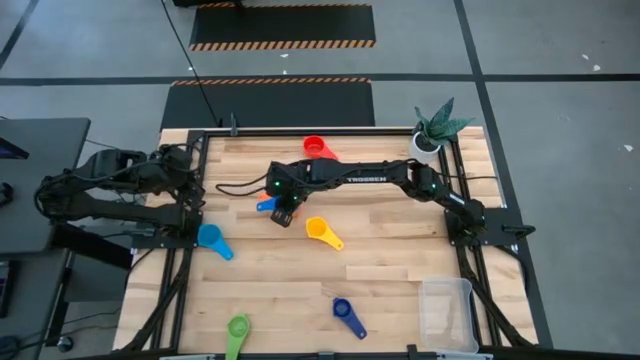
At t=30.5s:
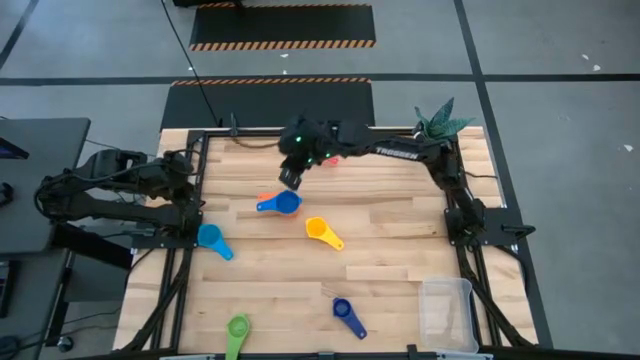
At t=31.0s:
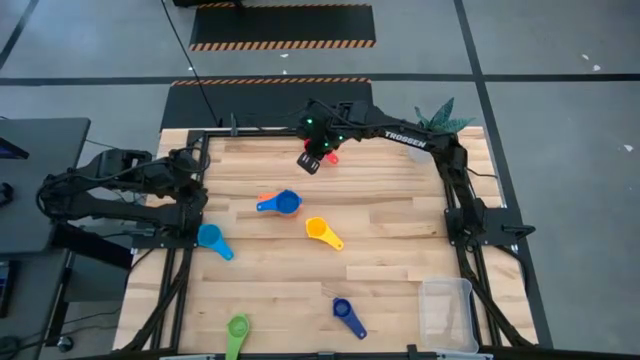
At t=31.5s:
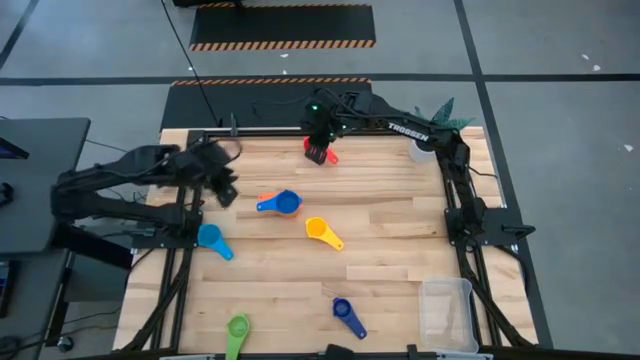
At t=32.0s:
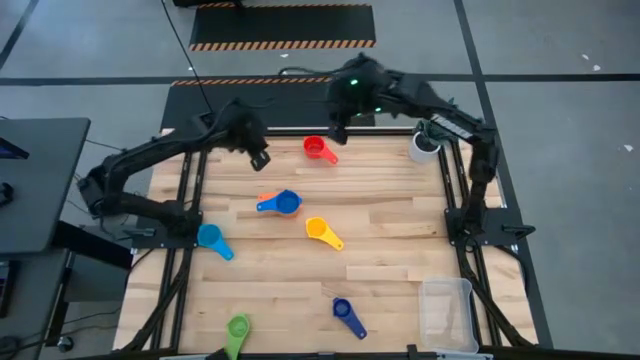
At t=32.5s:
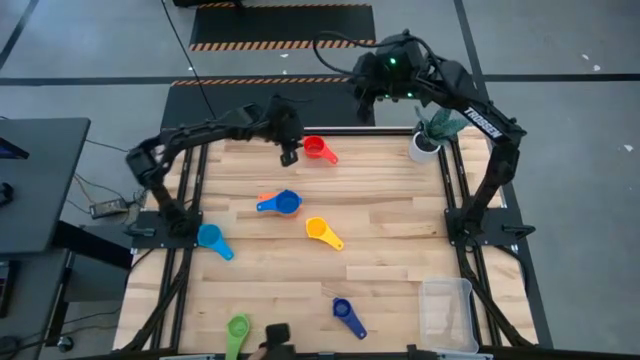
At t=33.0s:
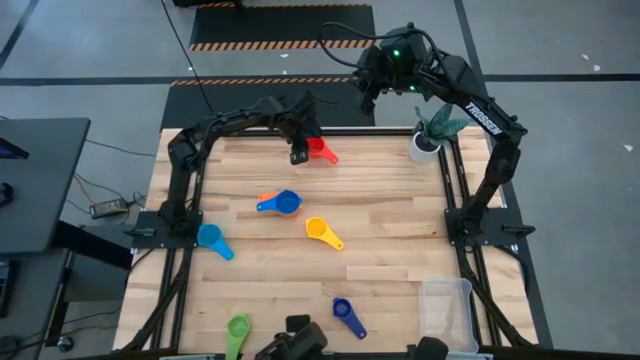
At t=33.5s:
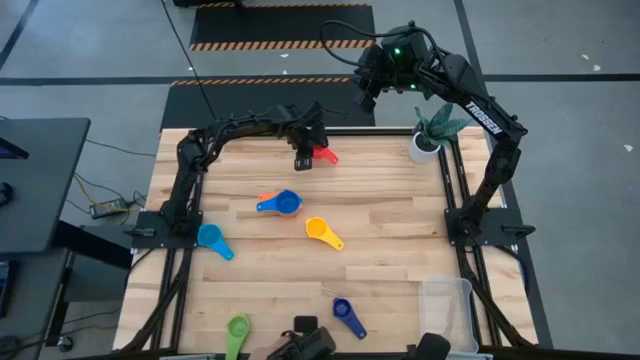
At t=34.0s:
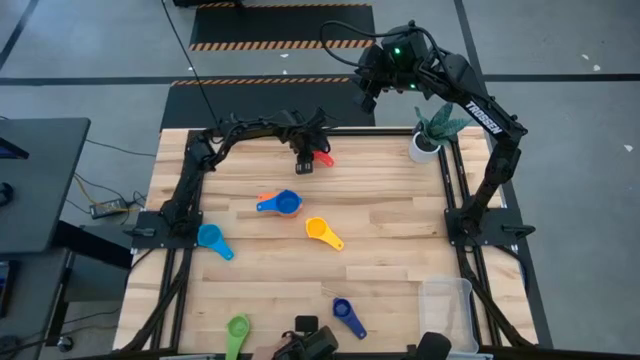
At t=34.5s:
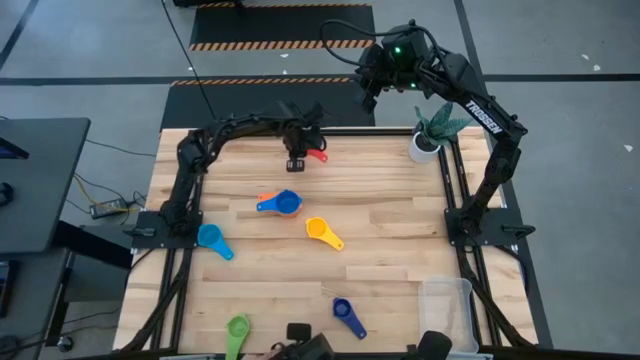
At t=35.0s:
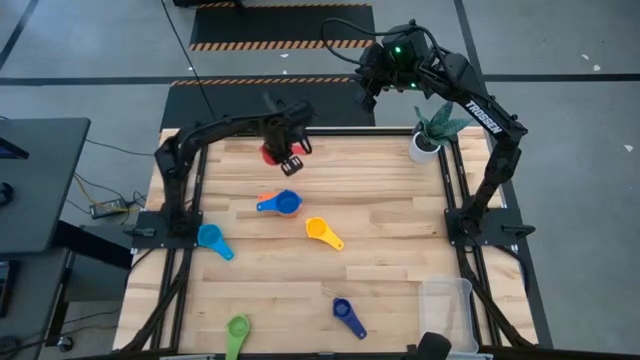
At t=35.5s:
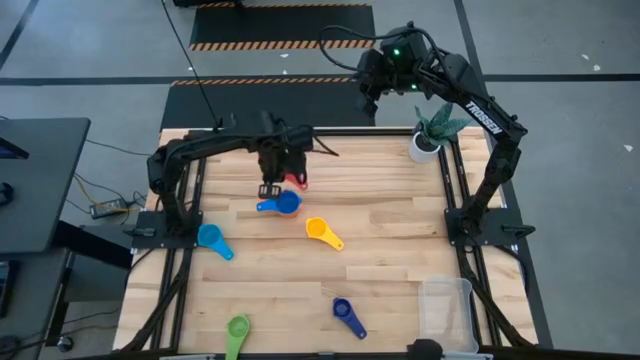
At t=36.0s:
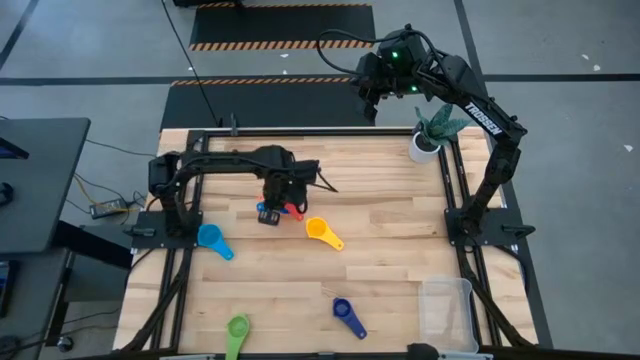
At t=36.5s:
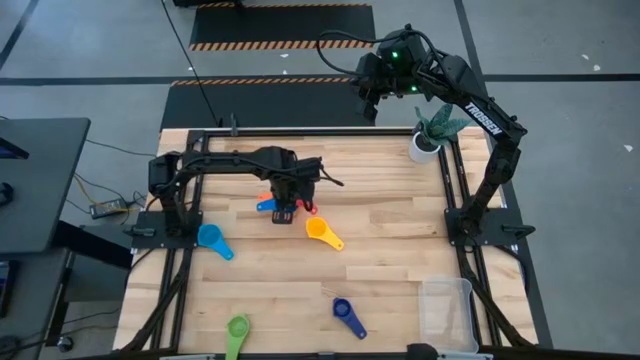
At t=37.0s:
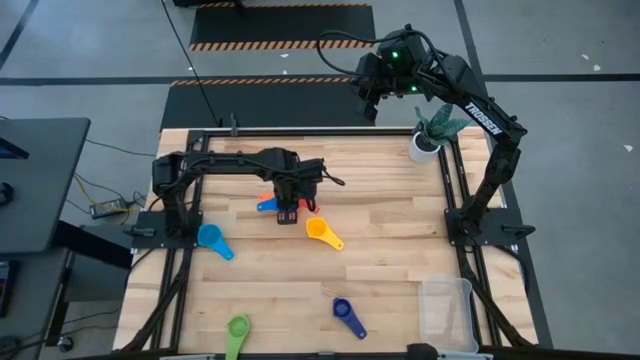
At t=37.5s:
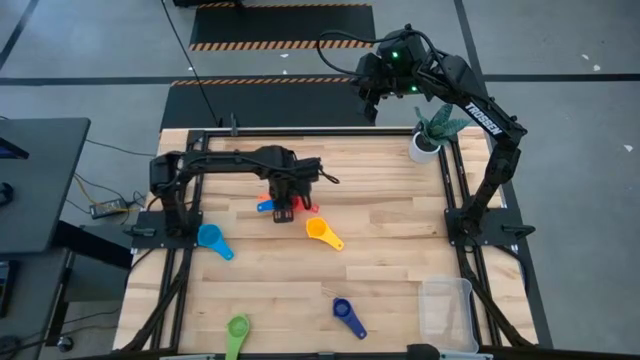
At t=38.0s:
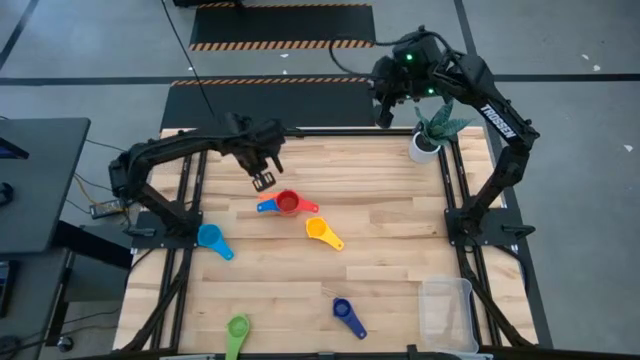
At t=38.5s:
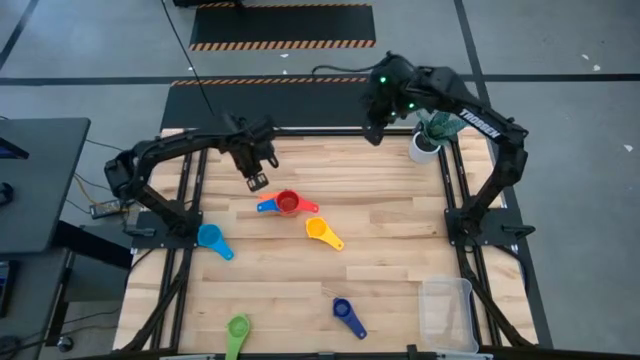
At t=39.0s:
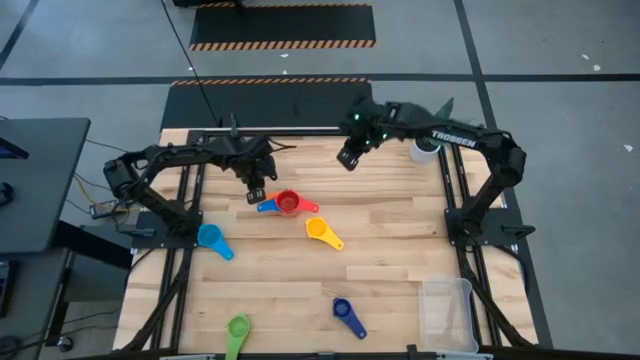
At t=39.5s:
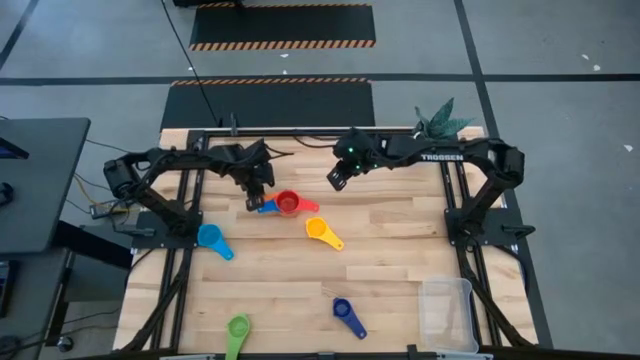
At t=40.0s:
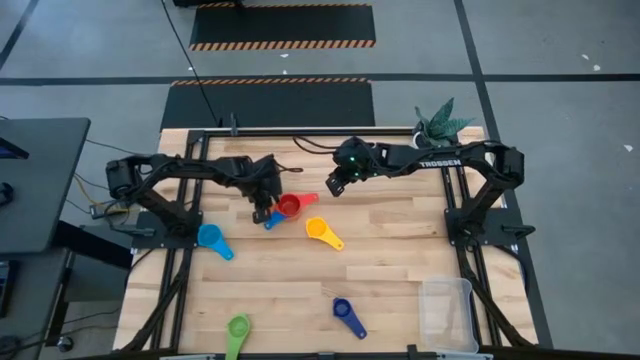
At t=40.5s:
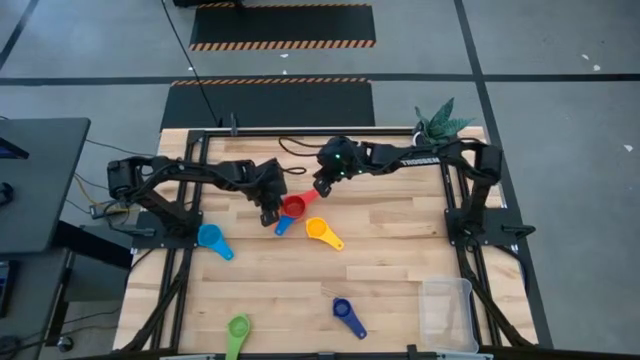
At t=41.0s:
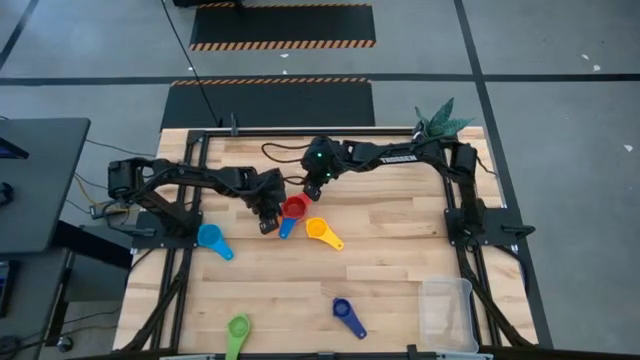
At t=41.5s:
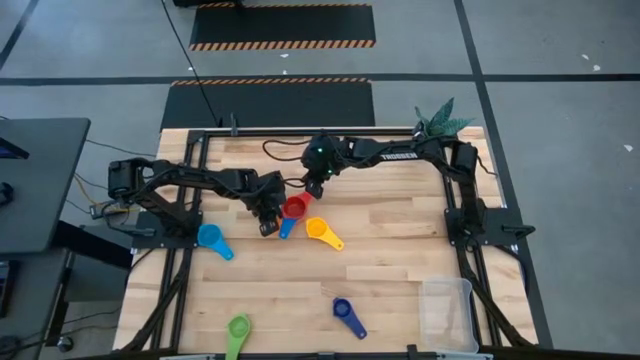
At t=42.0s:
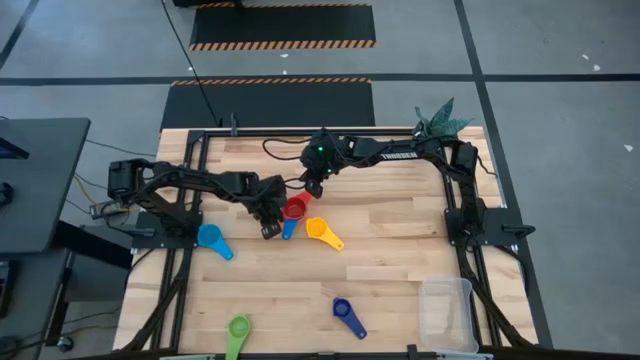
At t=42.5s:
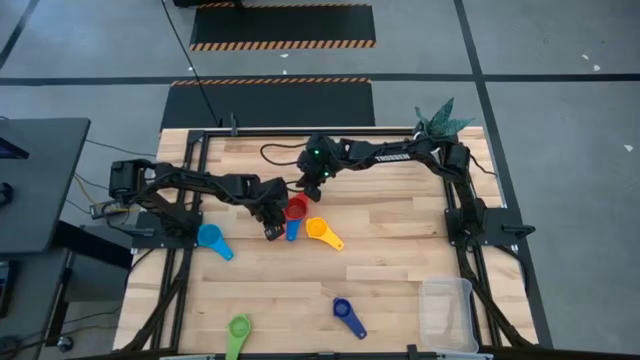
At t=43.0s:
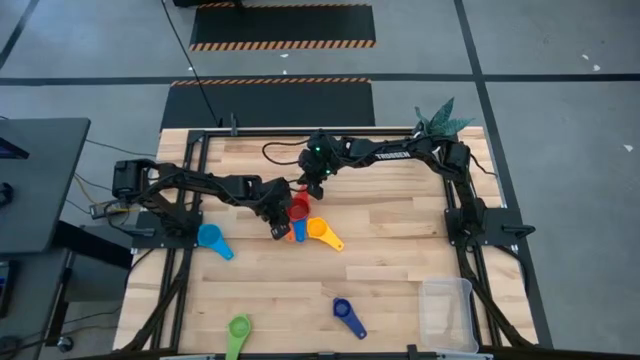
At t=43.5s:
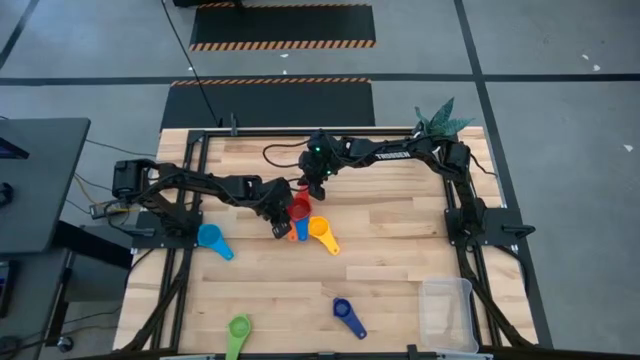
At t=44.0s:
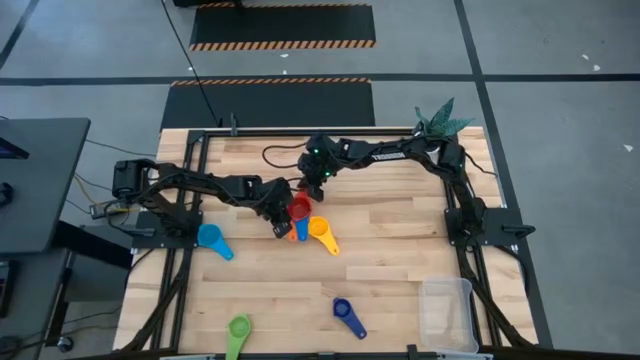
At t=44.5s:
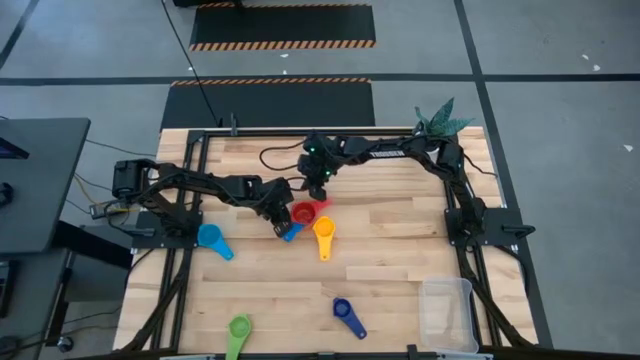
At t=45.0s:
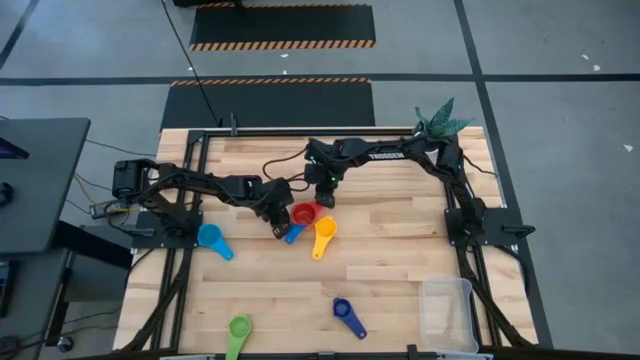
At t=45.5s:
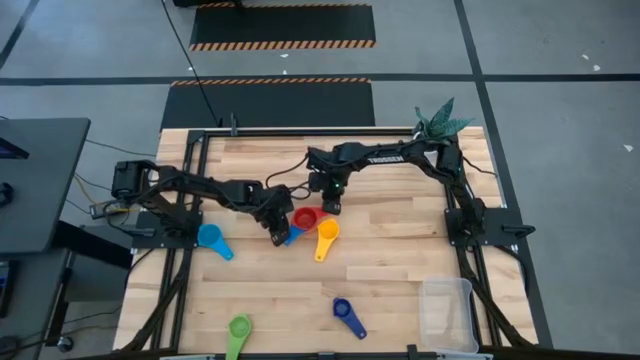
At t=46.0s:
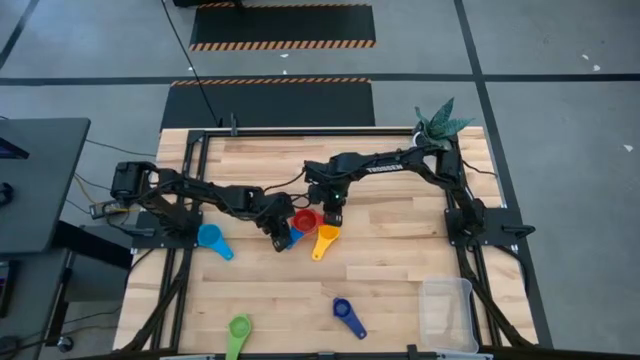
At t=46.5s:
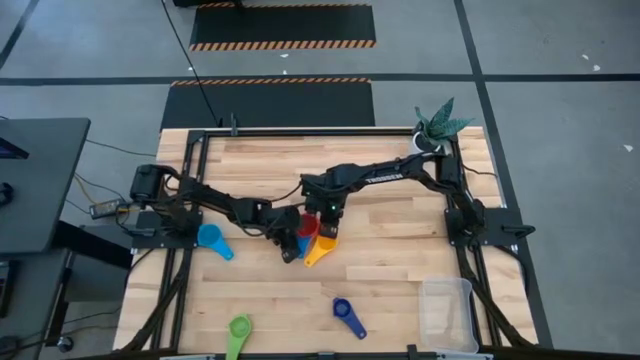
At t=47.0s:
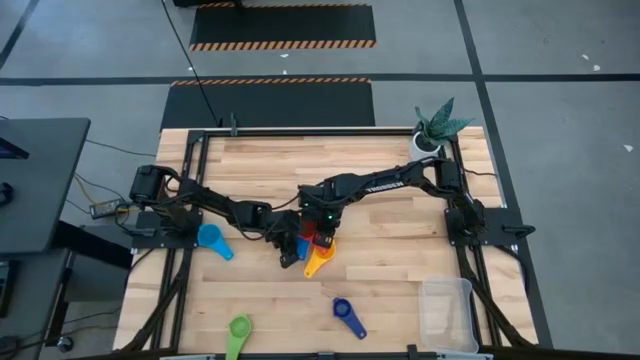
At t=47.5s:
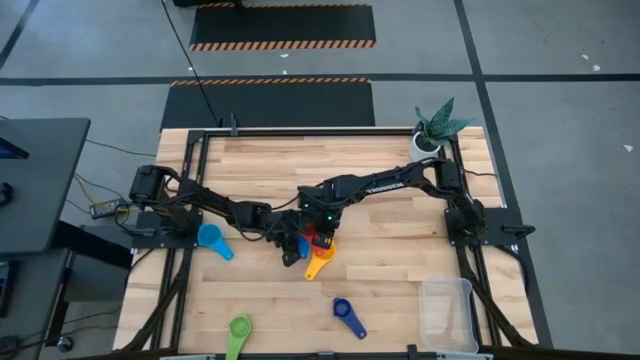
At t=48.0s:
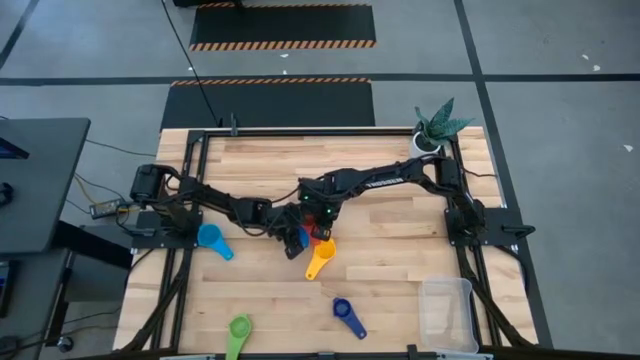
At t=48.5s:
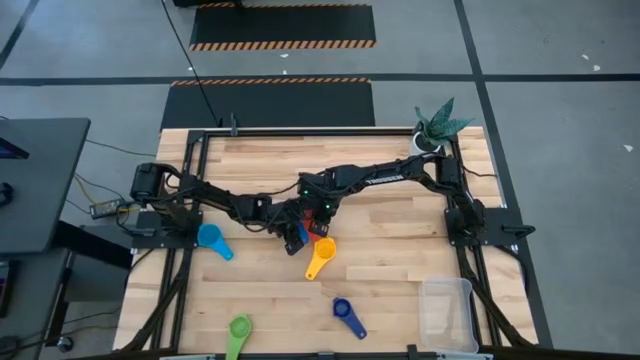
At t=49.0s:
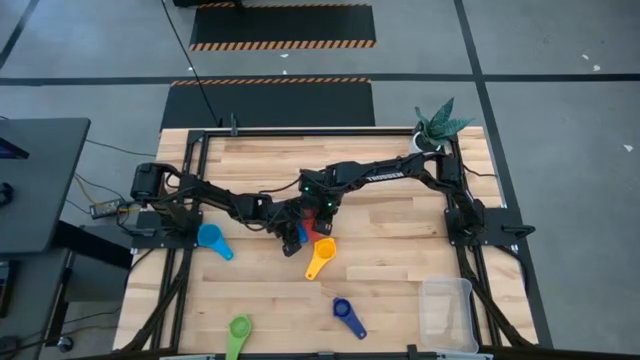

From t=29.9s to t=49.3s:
Task: Nest measuring cups in basket
Stack the red measuring cup on top of the blue measuring cup

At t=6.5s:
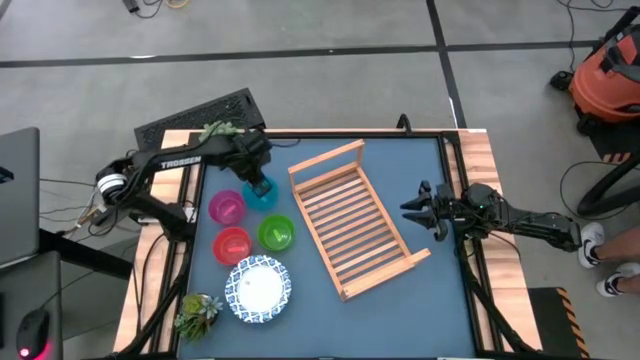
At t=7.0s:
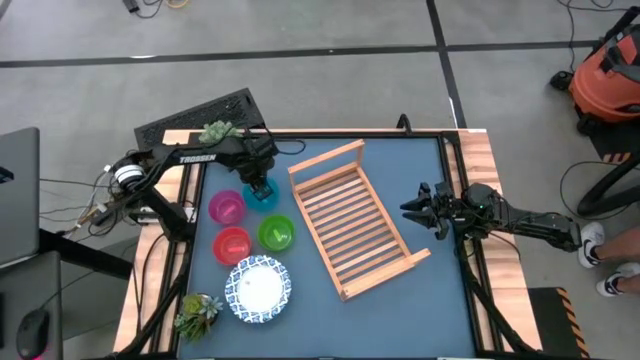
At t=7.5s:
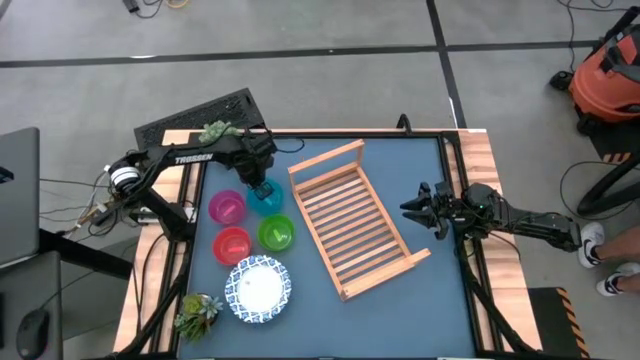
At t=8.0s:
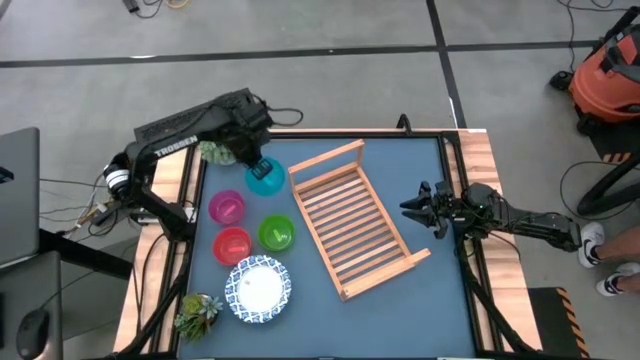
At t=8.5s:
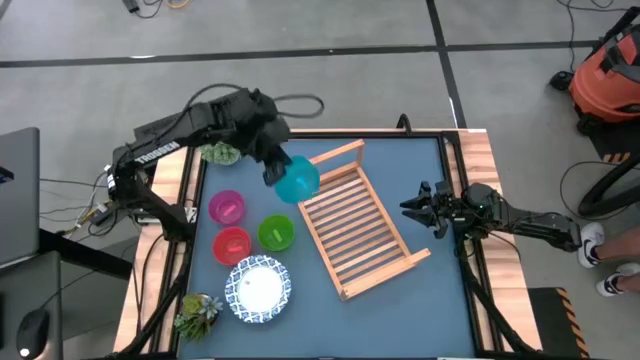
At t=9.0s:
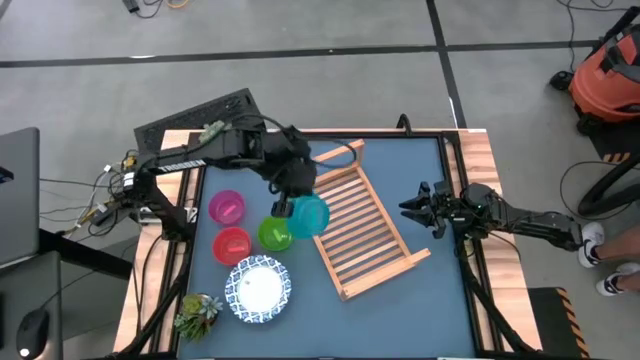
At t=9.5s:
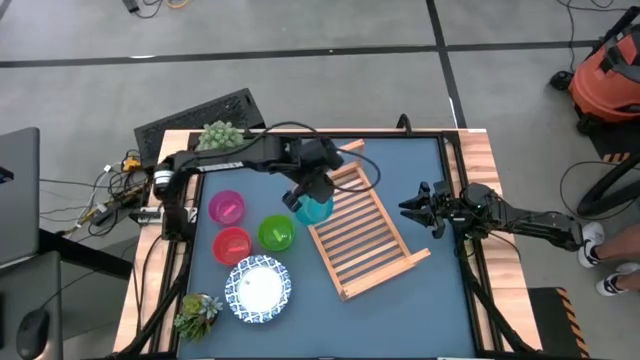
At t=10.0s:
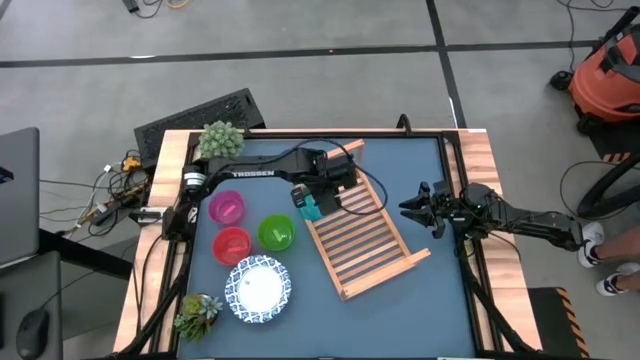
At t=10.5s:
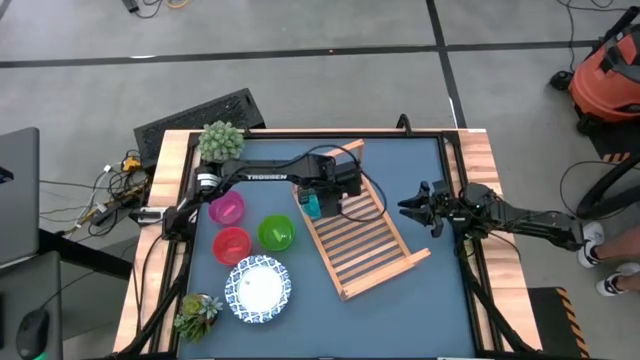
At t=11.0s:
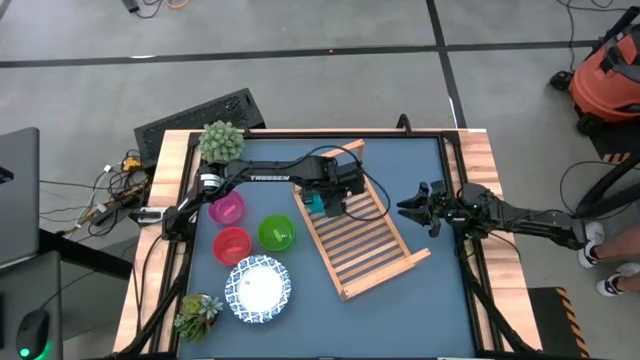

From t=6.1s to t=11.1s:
Task: Place and stack bowls onto a shelf
Put the blue bowl on the wooden shelf
